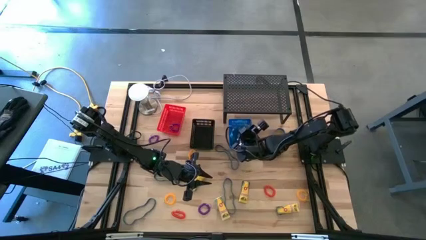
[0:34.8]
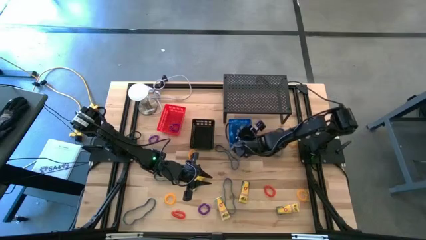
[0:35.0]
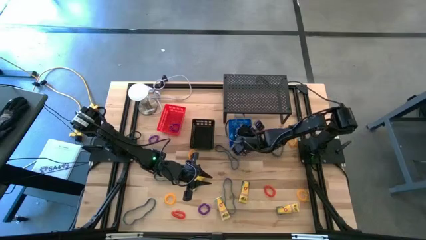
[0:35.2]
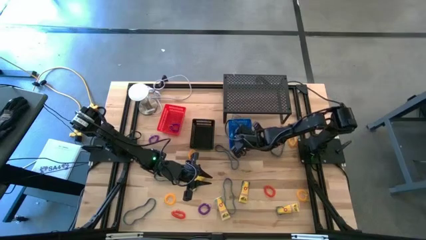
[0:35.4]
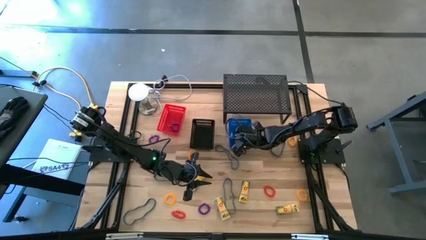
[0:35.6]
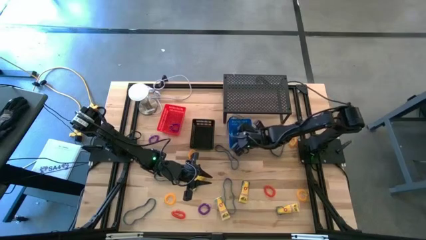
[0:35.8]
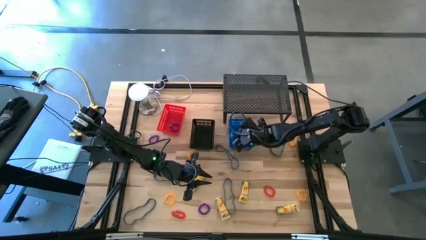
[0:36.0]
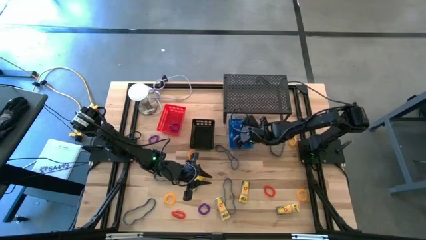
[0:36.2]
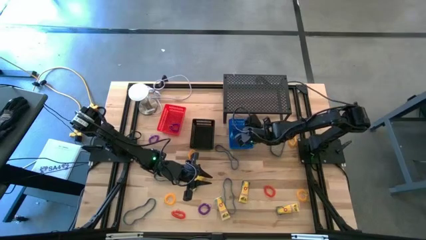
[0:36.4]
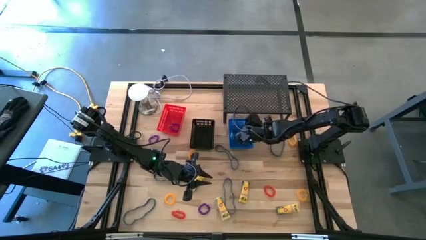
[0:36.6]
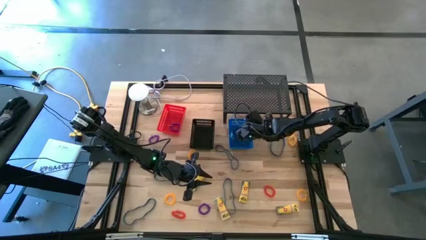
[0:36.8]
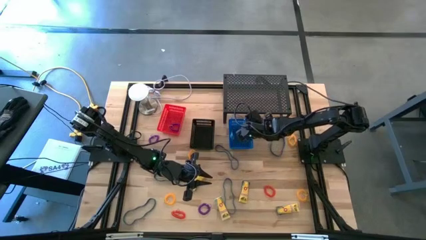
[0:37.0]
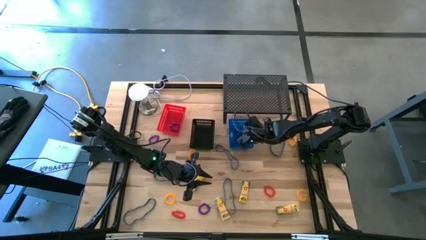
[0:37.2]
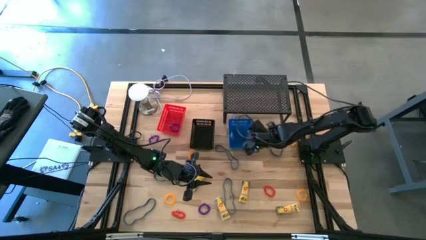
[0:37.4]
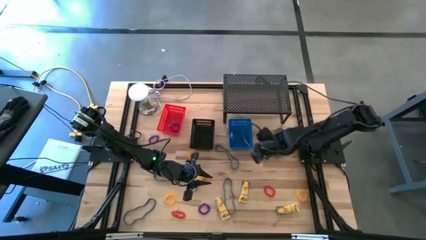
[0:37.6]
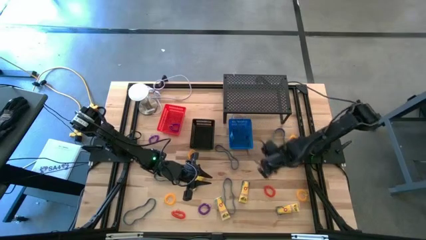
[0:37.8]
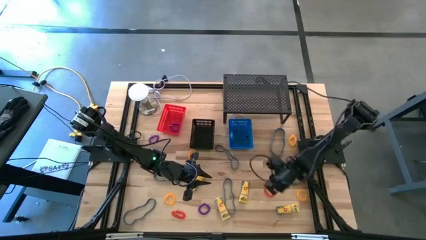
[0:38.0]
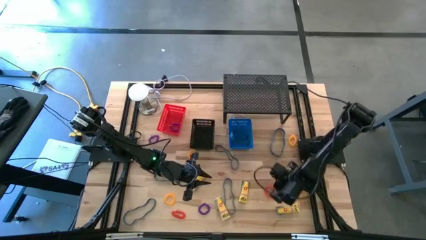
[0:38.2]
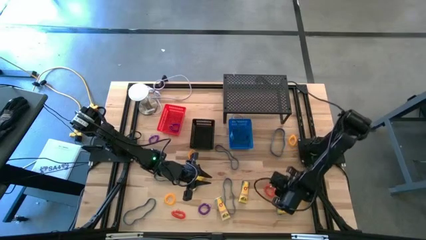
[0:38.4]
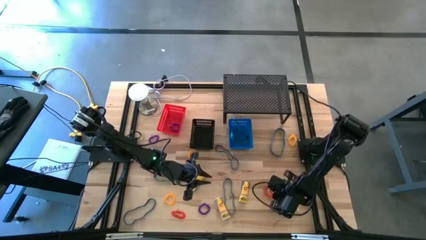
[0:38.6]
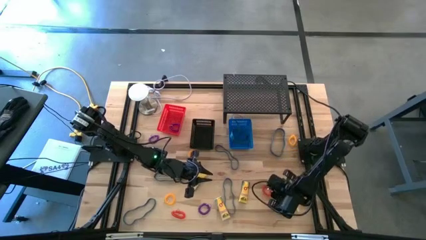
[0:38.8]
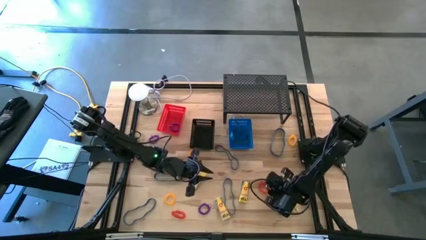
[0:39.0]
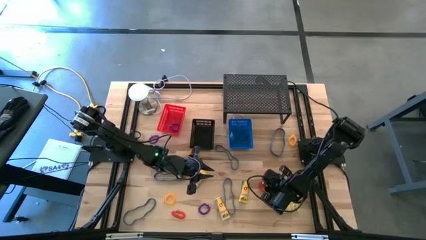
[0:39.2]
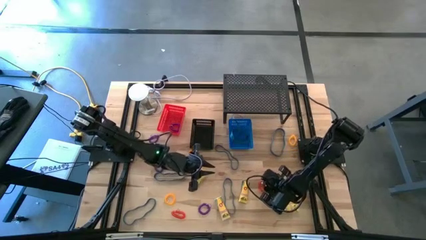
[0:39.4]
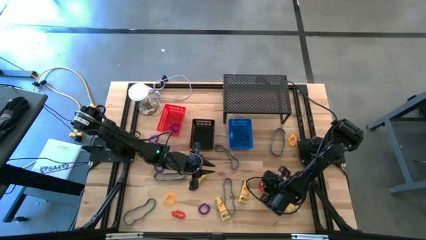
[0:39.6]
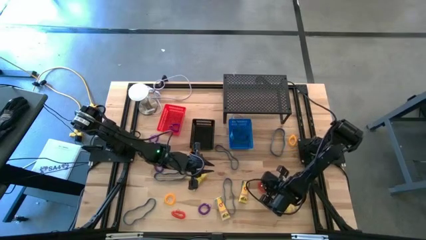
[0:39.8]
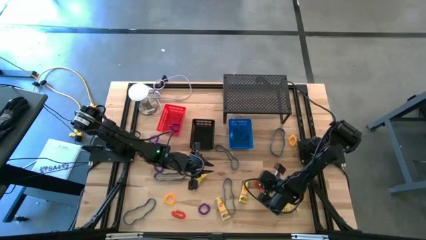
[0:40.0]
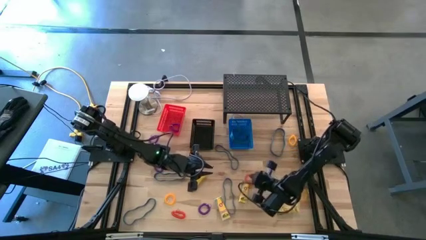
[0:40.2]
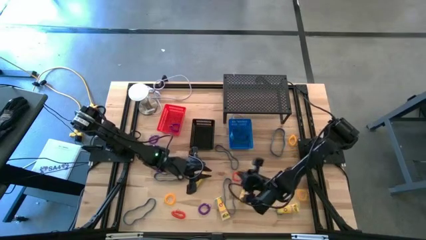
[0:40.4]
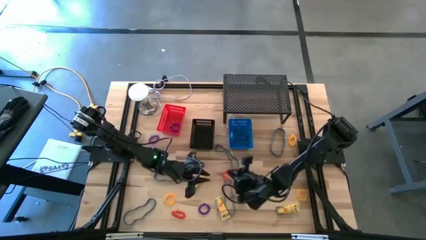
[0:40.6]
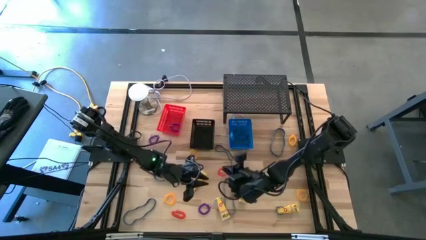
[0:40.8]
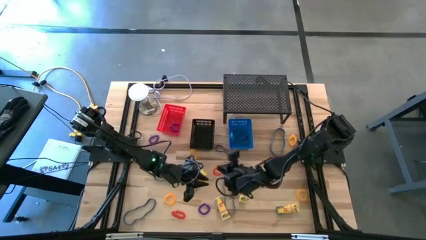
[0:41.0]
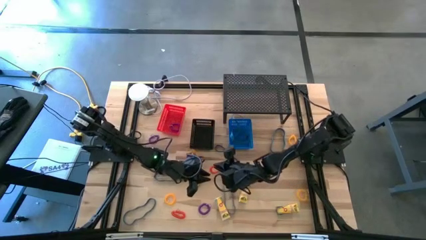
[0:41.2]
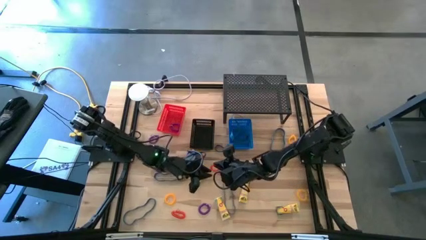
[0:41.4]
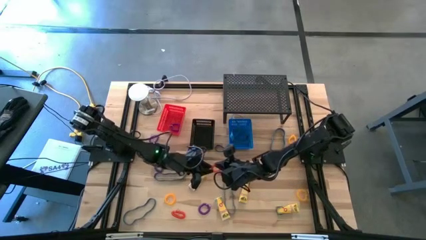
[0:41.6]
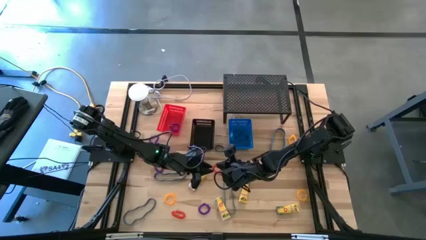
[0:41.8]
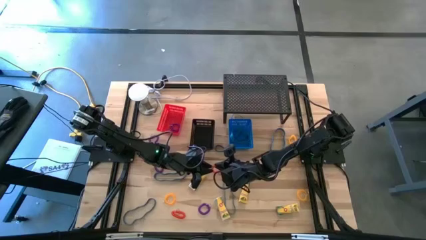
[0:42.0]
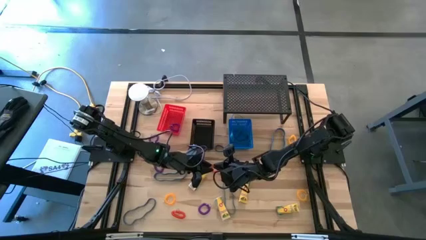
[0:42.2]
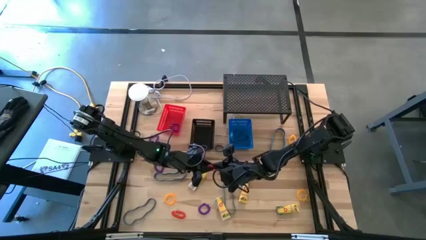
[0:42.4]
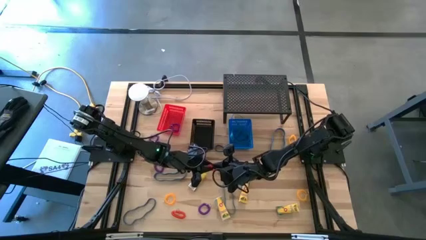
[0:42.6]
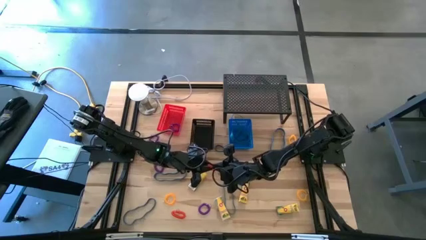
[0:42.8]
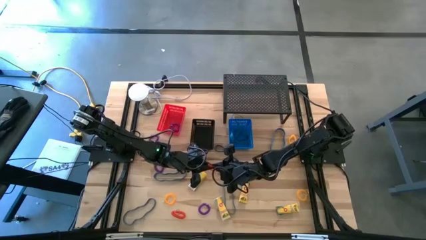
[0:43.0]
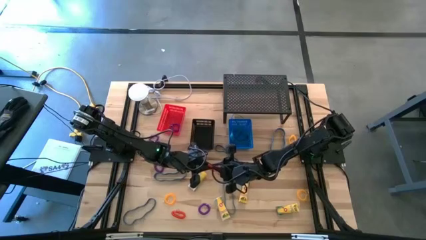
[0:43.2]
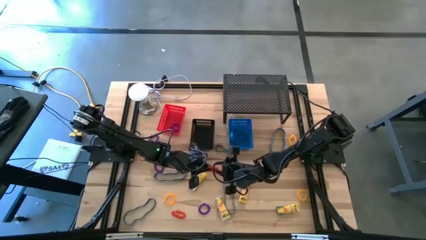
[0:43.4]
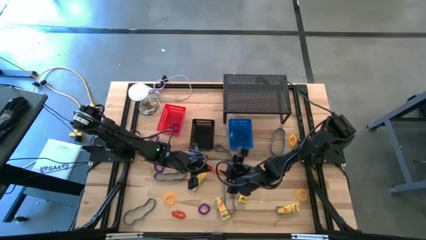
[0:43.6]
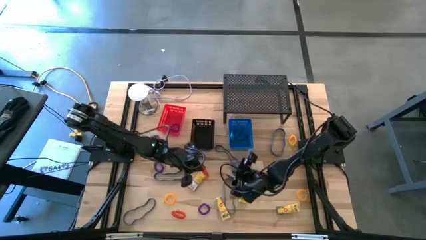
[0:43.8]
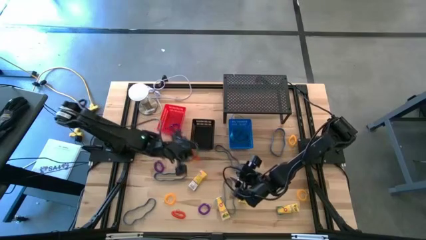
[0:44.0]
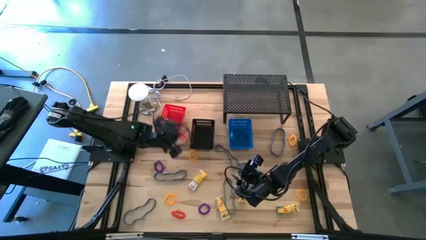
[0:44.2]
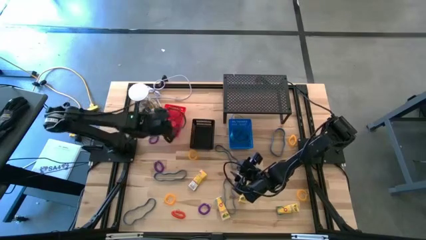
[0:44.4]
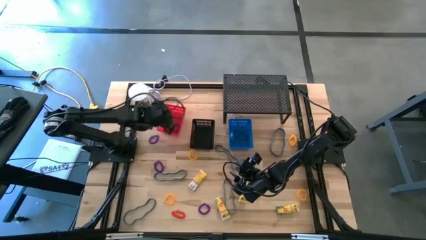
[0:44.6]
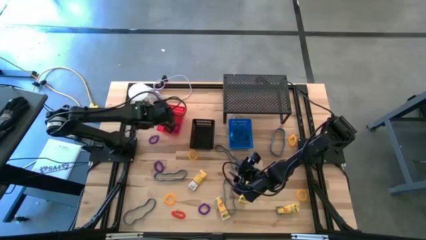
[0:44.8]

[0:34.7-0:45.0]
Task: Pick & Place Office Desk Supplies
Put the right orange wrist coil keychain into the orange bin

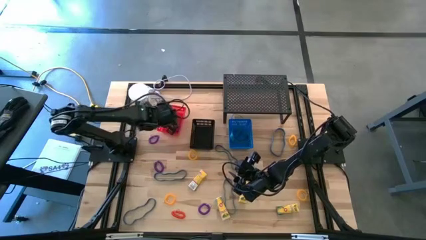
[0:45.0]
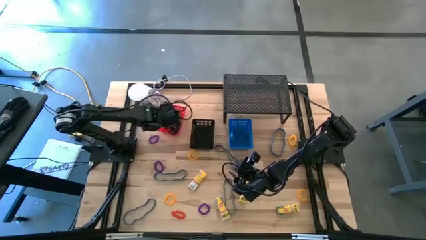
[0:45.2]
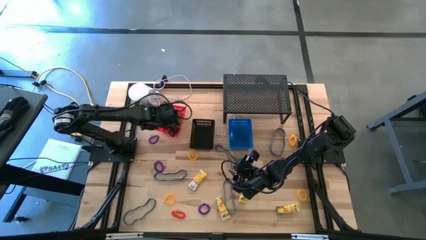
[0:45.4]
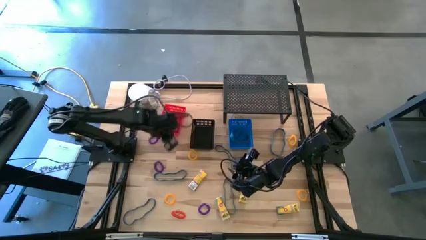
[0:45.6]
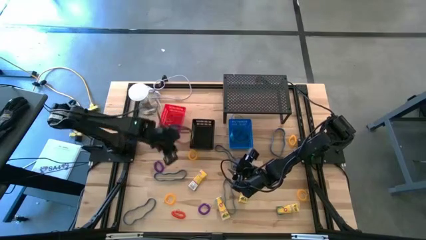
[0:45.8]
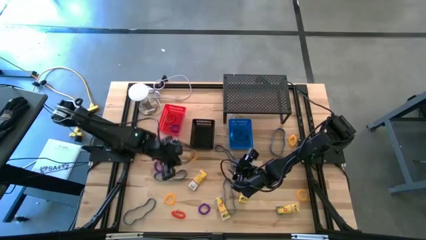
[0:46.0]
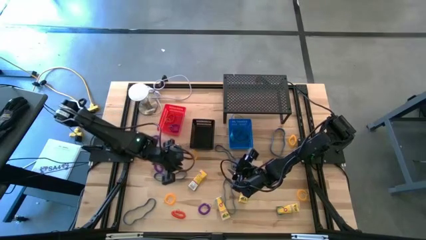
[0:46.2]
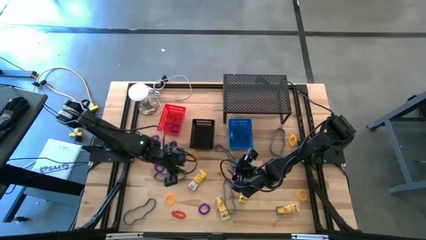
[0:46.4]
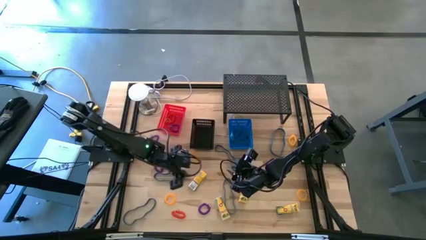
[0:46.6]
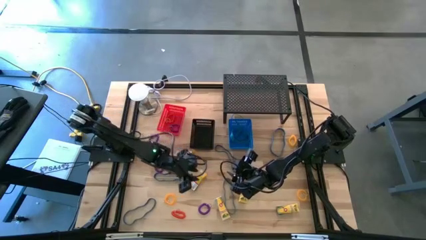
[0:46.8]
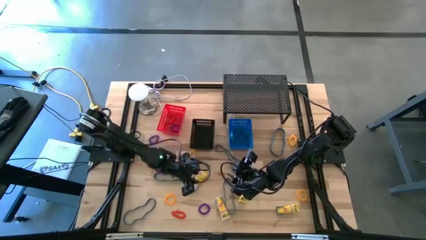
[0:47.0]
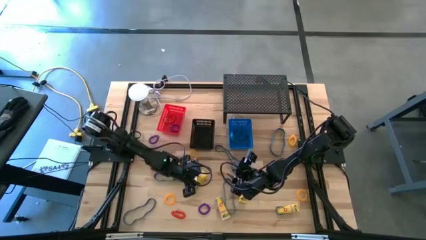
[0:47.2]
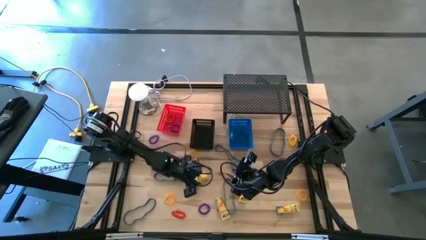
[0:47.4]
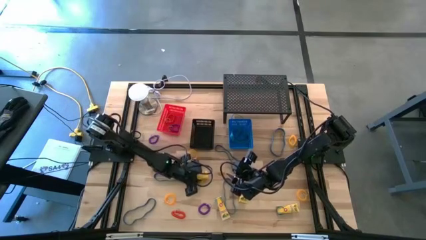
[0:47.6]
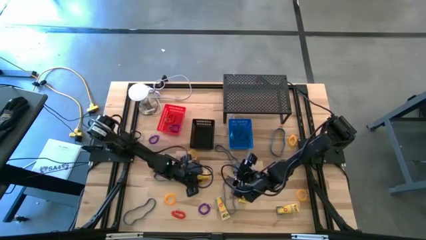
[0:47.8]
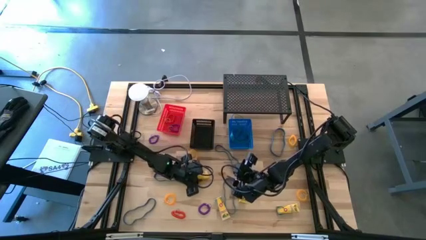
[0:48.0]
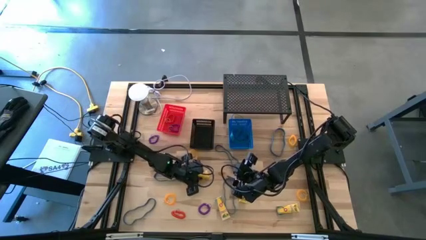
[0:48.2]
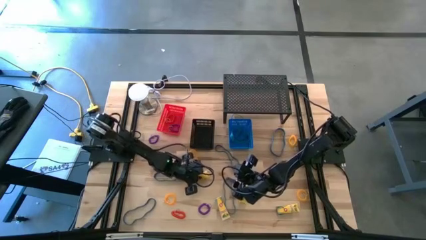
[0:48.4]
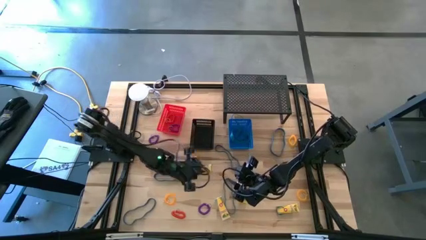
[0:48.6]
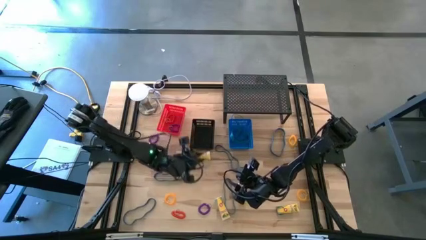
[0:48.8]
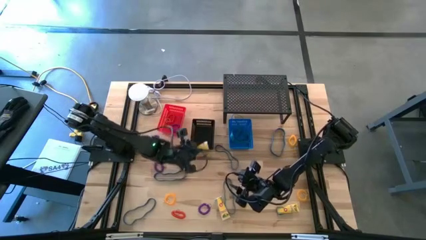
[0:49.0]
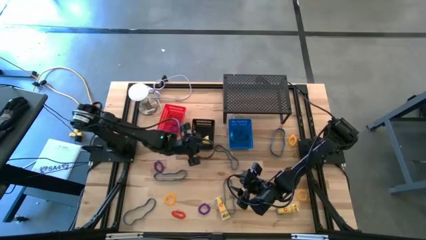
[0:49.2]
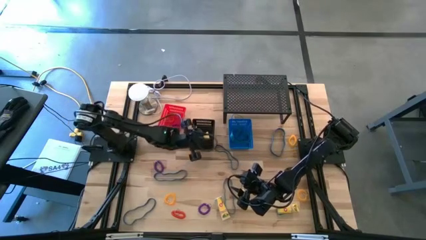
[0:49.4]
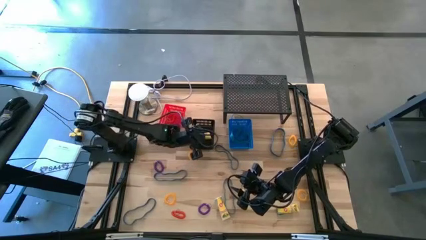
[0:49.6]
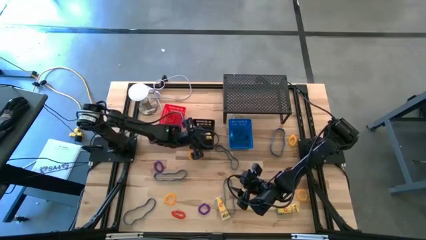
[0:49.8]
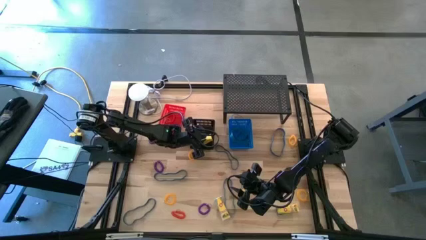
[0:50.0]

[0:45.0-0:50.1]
Put the left crayon box into the black bin

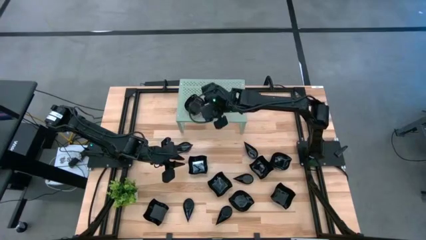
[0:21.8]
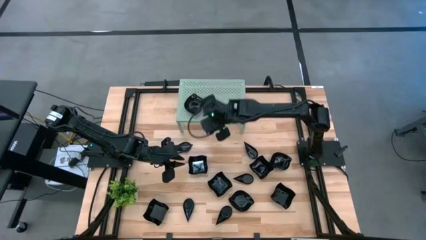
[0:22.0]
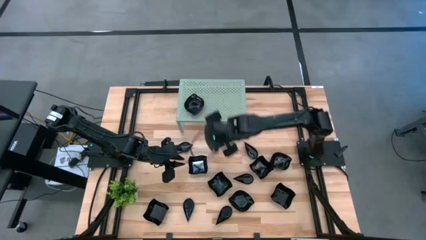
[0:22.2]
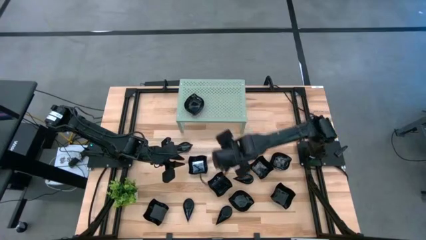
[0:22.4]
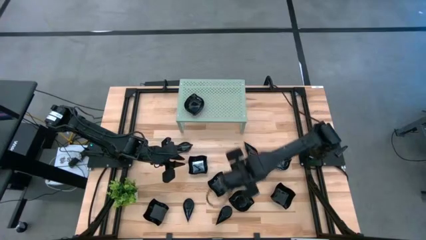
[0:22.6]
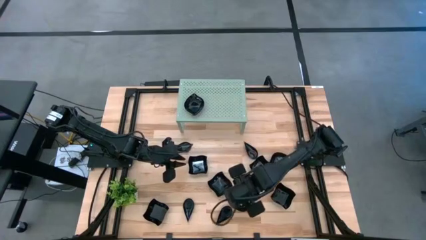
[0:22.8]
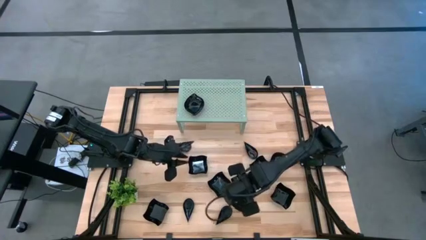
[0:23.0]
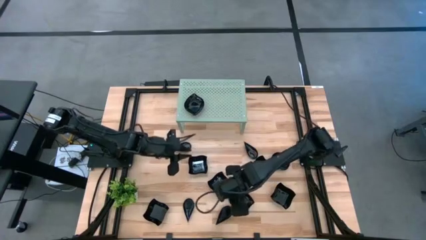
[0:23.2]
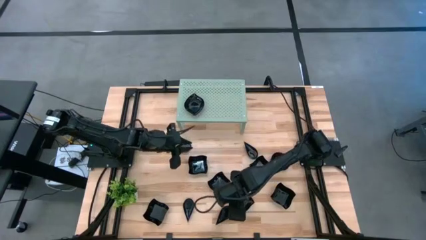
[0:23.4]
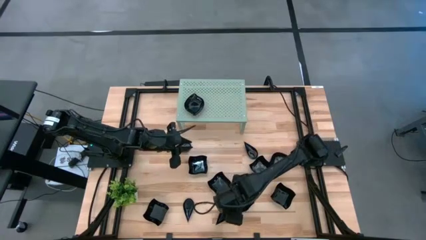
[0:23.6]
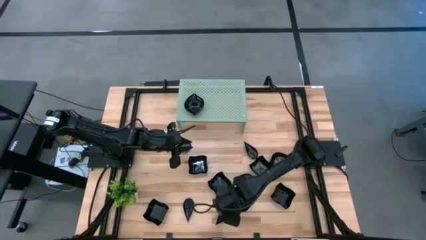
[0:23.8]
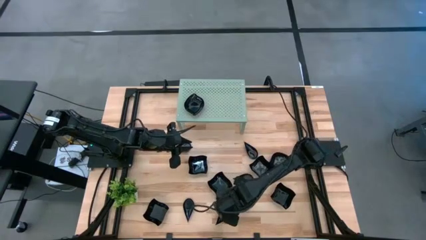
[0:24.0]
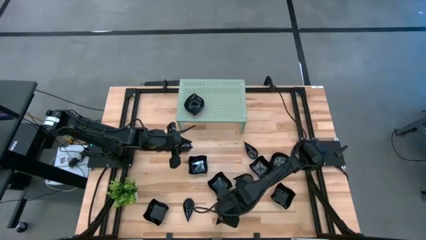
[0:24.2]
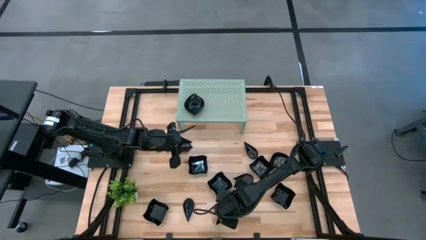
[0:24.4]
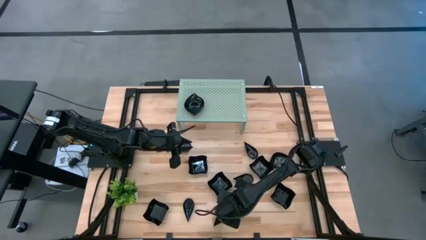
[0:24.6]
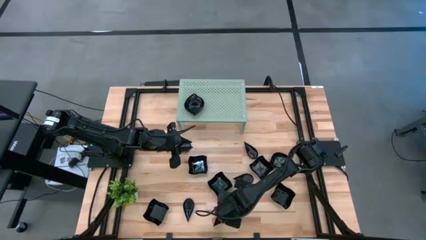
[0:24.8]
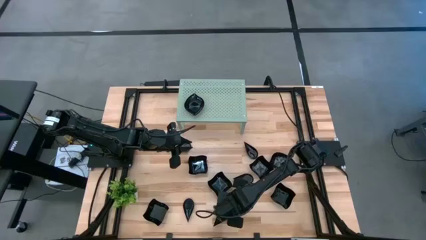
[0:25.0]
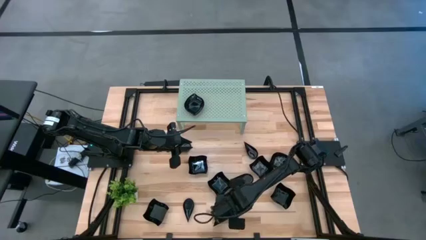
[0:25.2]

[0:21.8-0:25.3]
Task: Pick & Place Mini shaped plates
Stack the leaf-shaped plate on top of the other leaf-shaped plate on the shelf
